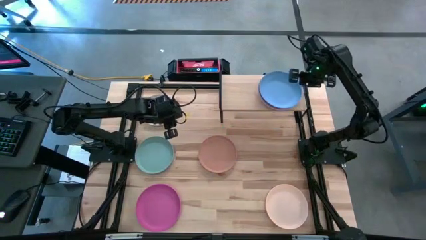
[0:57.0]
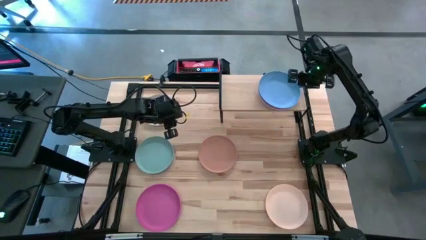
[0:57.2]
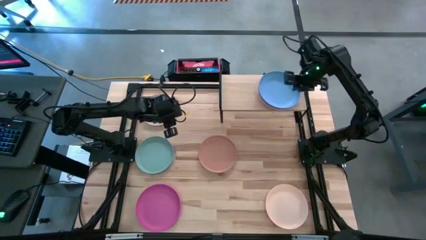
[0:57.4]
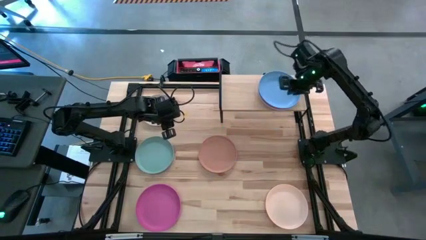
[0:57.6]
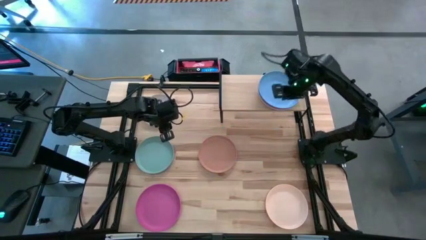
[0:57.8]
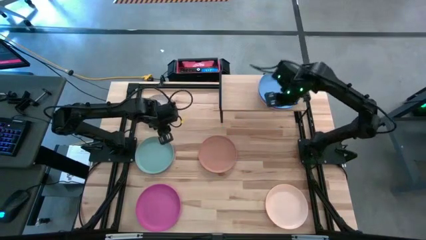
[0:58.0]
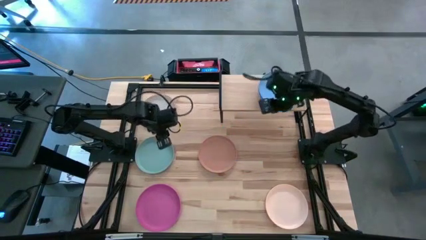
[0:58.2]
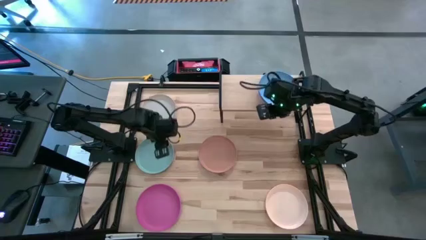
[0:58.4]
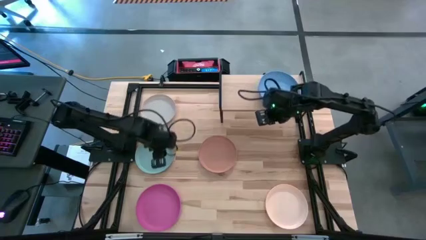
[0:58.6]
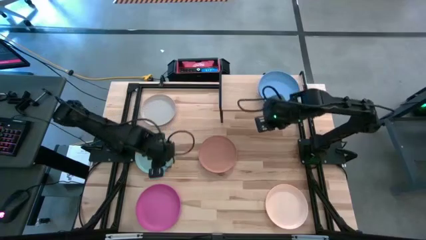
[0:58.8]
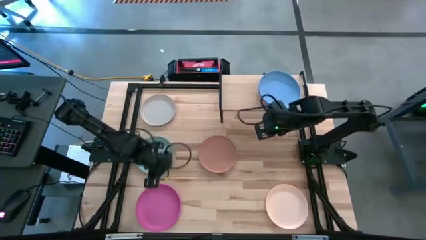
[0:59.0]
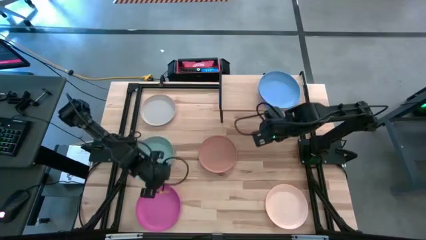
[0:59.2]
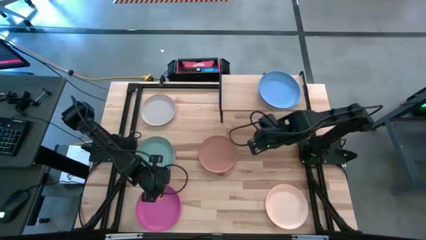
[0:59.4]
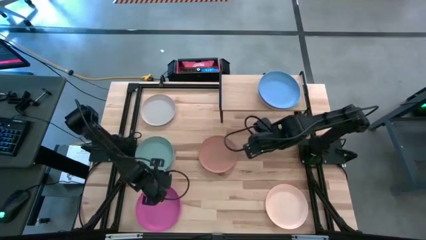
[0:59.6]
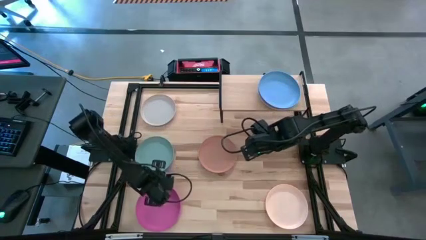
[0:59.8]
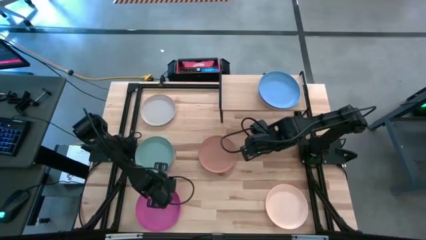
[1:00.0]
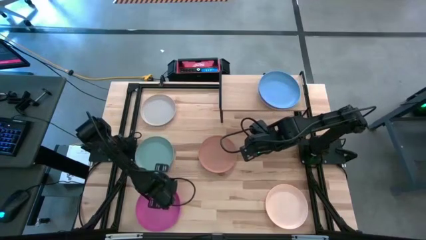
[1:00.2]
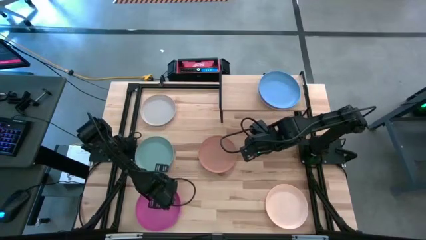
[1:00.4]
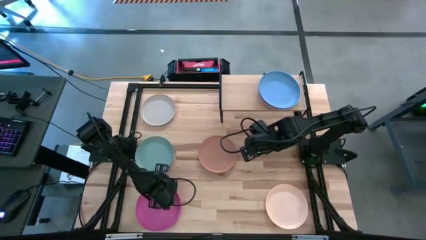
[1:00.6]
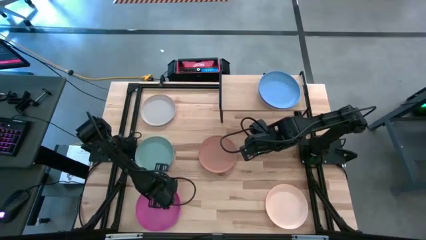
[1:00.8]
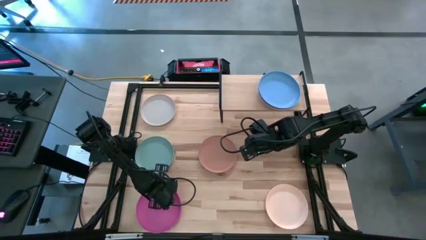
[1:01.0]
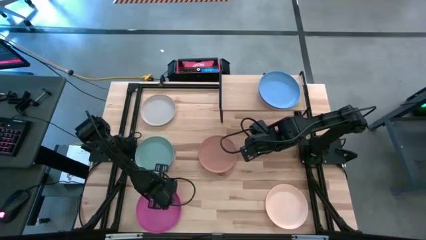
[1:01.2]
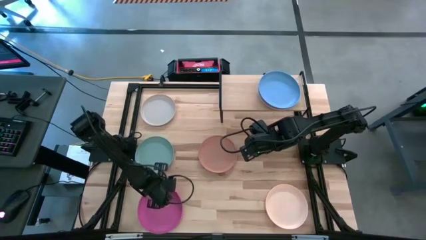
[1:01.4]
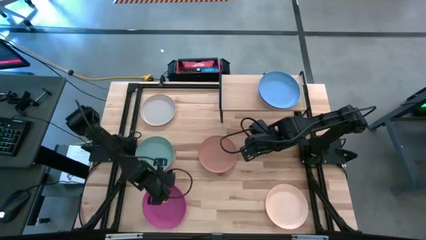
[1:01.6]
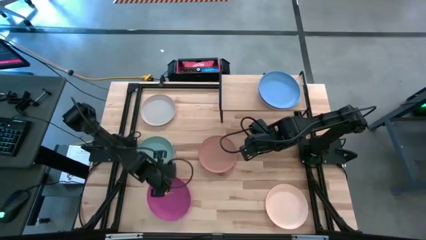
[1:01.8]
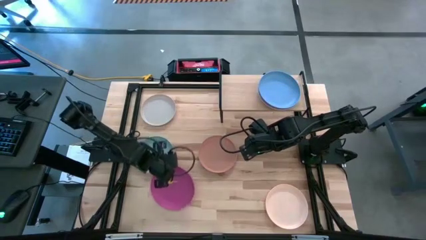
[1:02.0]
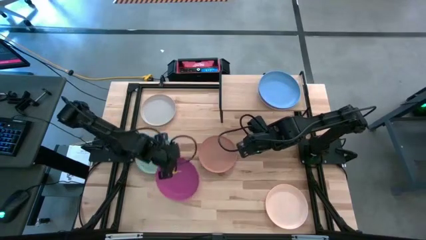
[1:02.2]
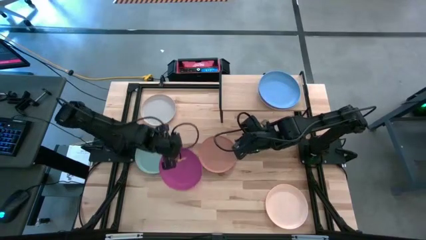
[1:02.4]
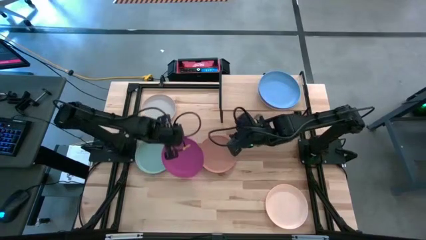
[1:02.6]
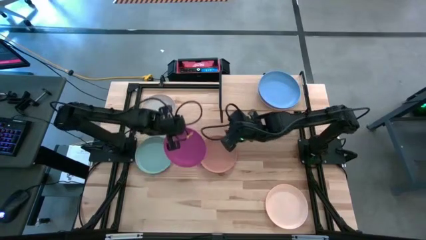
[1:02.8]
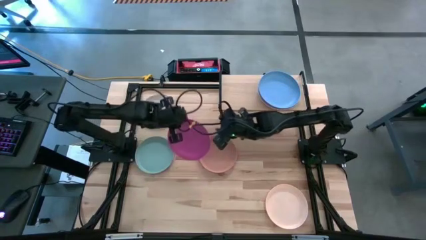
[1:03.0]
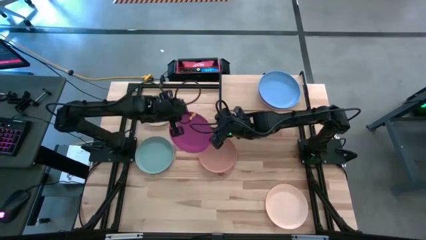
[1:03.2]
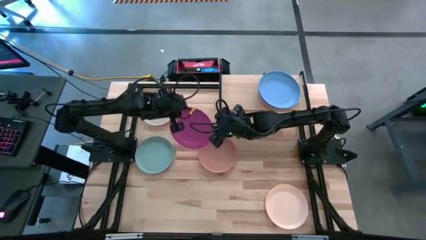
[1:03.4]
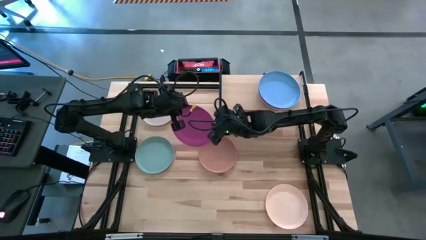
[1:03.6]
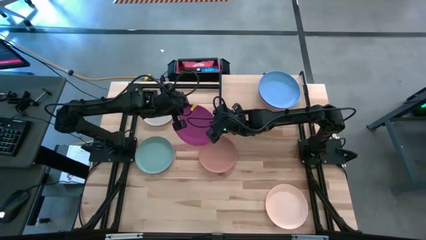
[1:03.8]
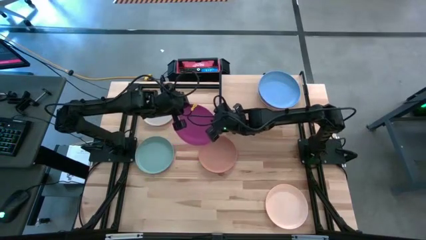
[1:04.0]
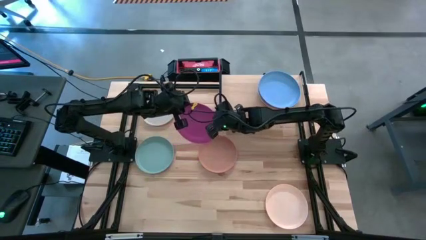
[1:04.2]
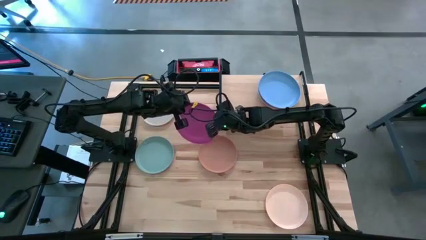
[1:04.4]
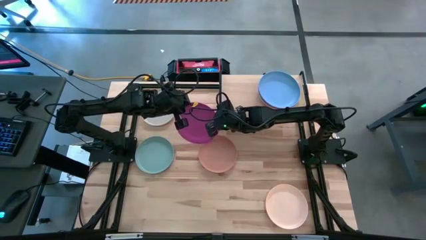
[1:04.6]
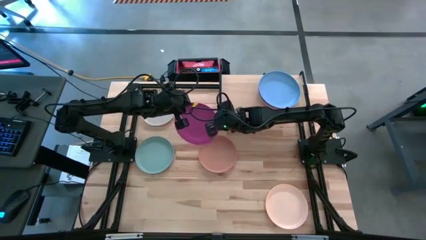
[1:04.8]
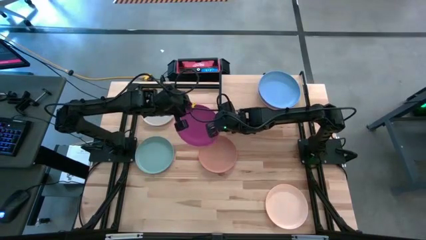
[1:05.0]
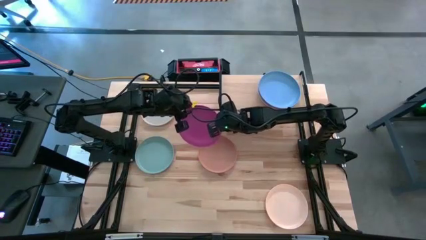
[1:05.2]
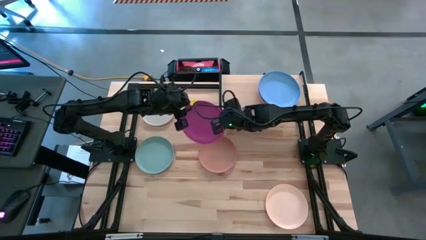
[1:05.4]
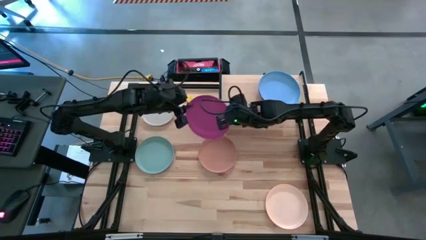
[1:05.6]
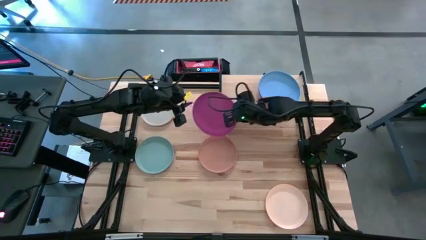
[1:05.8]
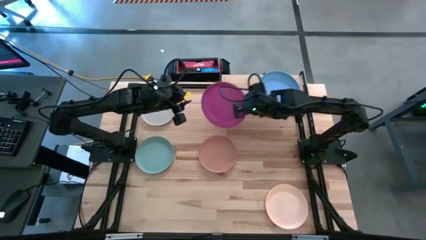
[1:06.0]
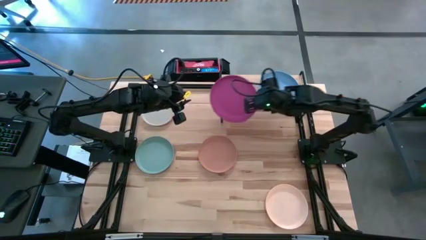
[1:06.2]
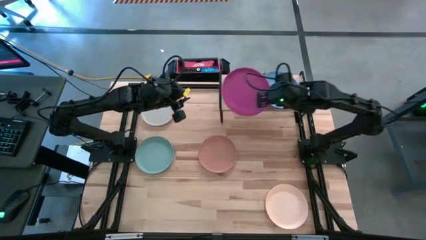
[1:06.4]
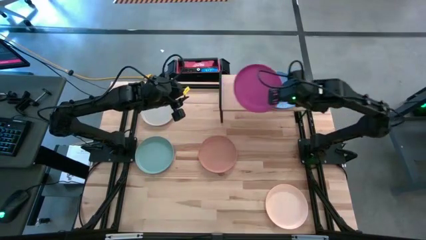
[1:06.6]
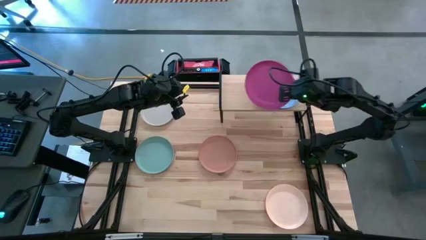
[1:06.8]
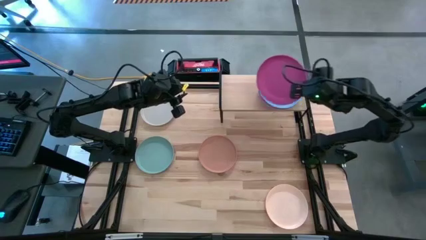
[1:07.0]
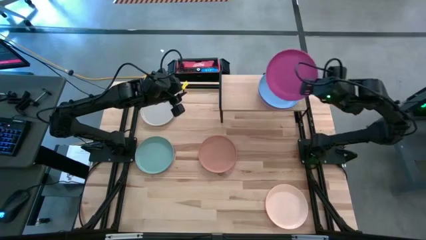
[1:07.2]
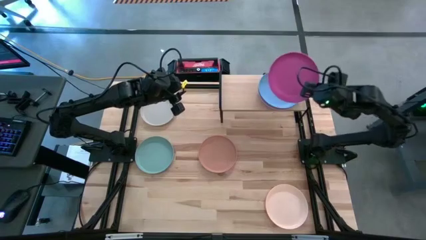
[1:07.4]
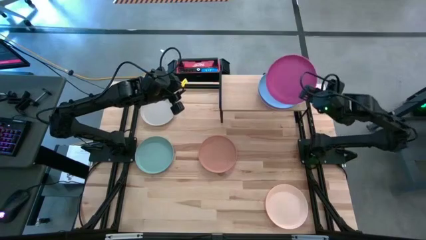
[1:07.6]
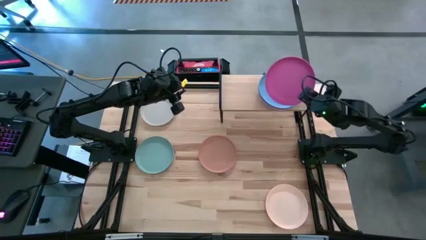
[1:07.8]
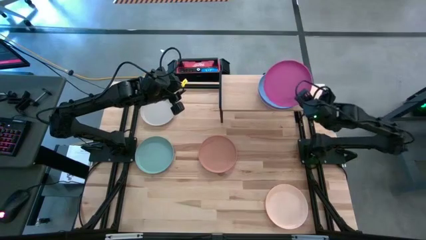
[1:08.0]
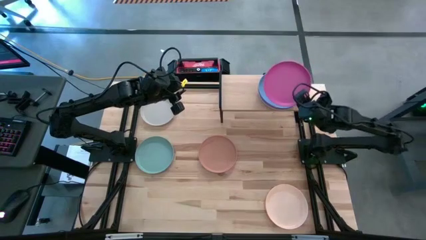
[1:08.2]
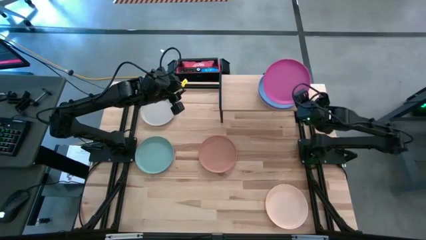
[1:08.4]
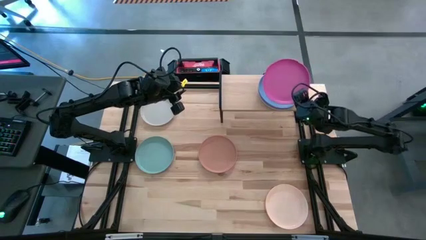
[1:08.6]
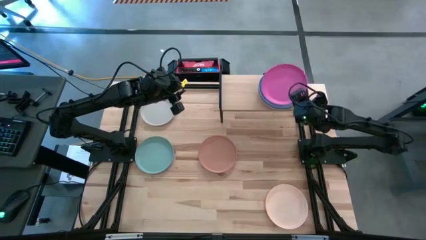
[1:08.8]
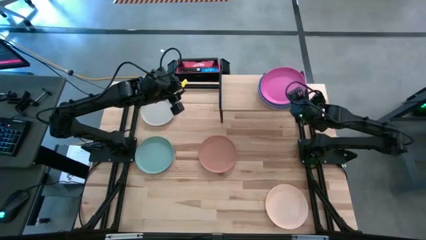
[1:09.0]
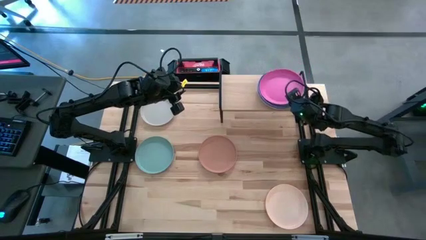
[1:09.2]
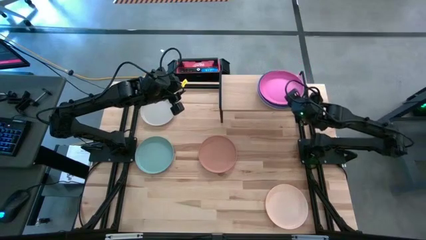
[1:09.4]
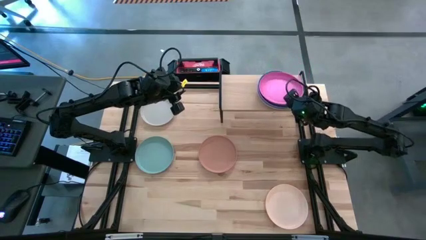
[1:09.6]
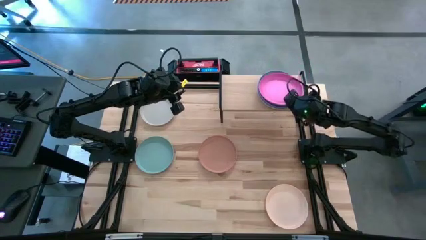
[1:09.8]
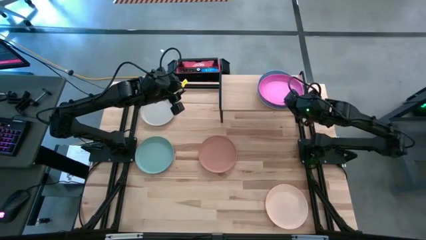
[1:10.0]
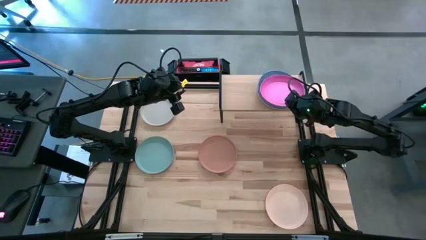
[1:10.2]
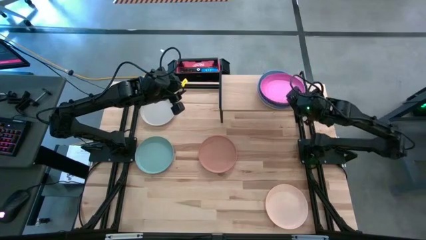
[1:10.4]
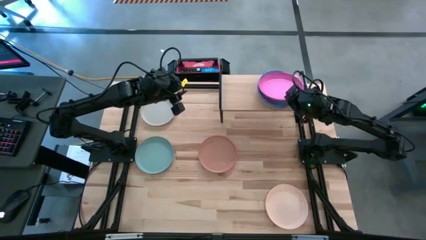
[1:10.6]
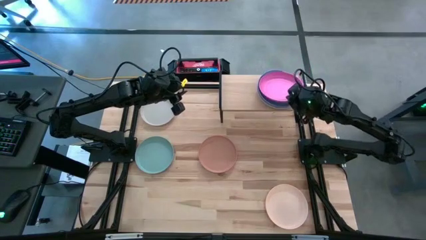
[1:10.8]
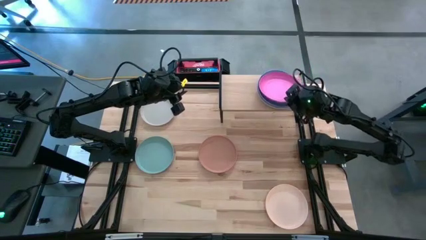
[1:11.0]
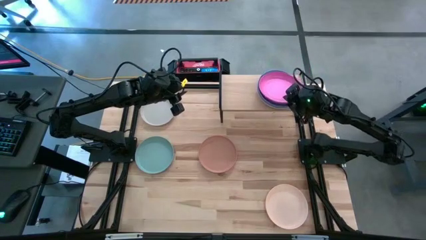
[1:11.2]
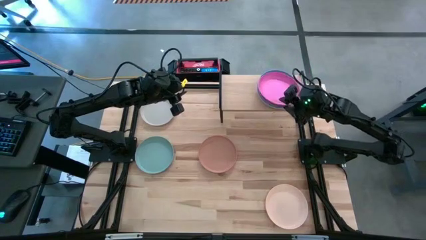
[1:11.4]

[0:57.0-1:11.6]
Task: Place and stack plates onto a shelf
Stack the pink plate on top of the blue plate on the shelf

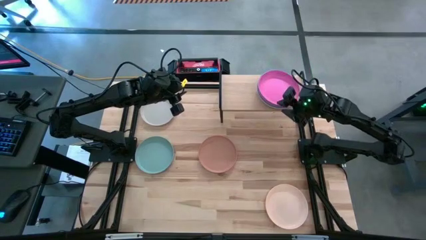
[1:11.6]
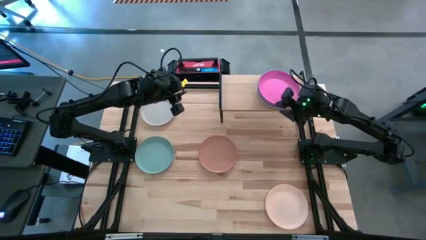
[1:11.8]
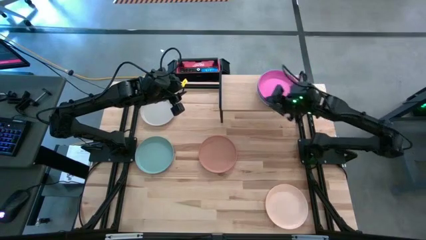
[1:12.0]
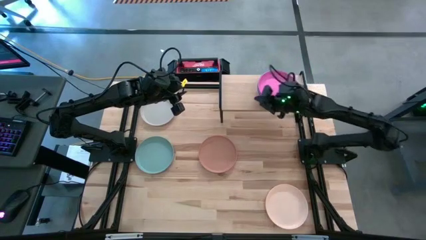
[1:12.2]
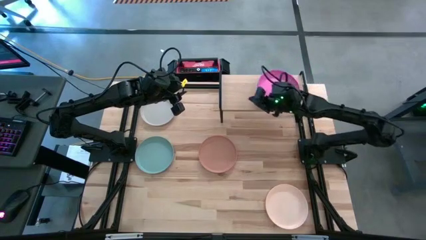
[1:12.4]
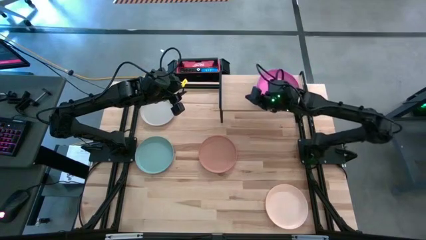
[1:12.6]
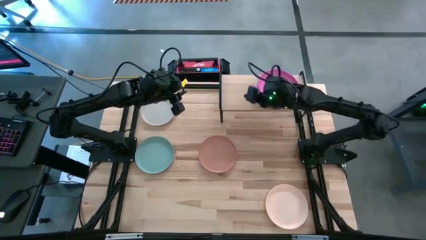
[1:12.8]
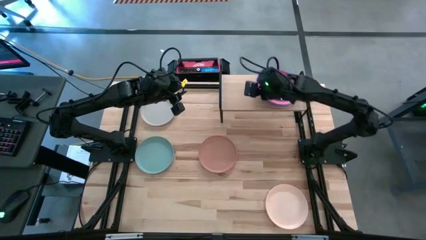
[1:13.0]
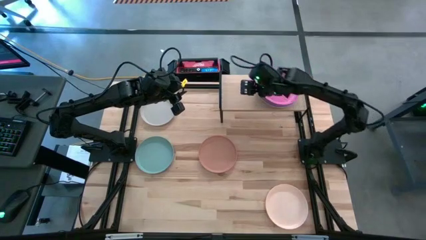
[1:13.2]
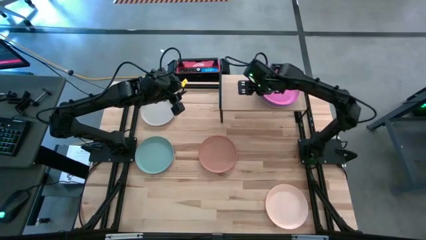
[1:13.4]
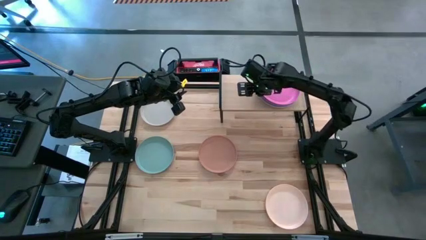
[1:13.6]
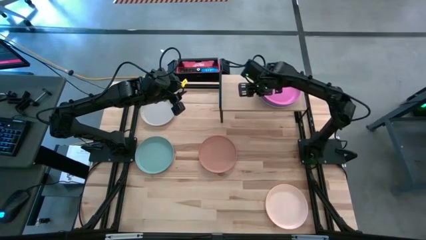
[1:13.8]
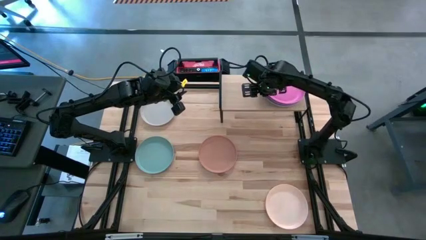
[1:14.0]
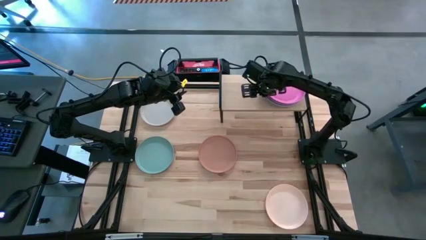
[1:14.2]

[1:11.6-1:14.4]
Adjust the stacked plates on the shelf
